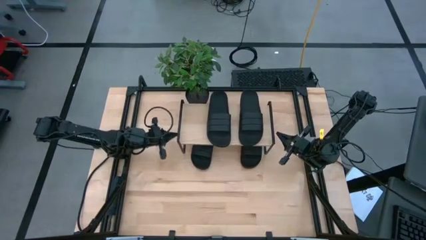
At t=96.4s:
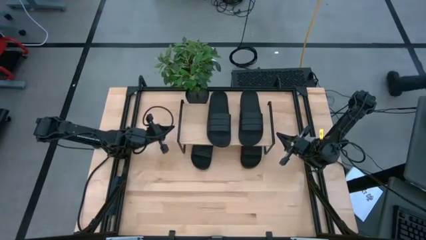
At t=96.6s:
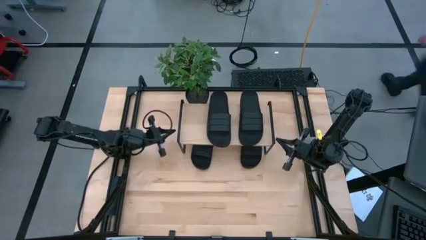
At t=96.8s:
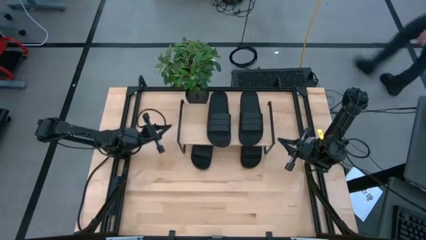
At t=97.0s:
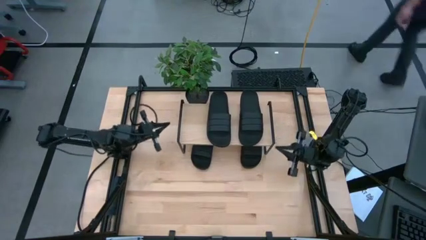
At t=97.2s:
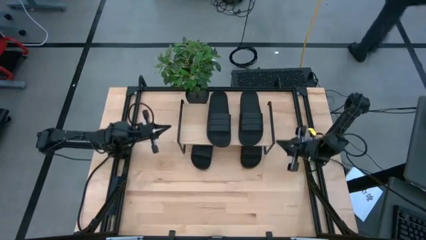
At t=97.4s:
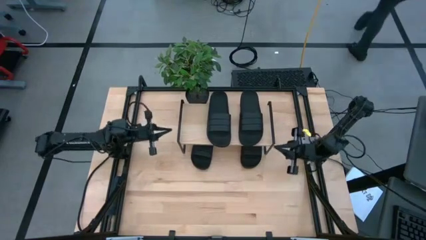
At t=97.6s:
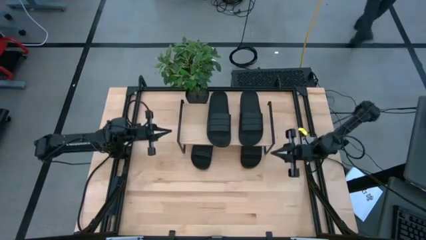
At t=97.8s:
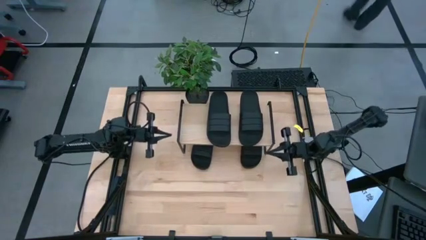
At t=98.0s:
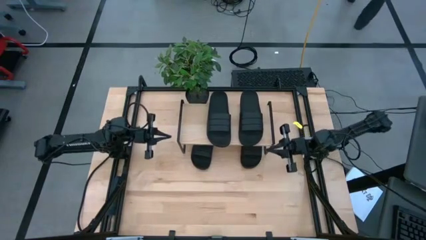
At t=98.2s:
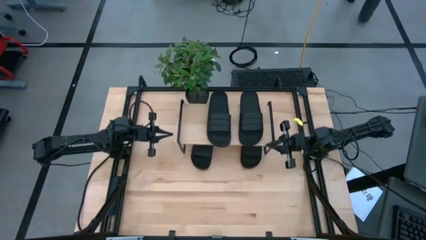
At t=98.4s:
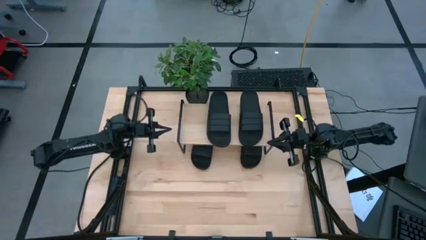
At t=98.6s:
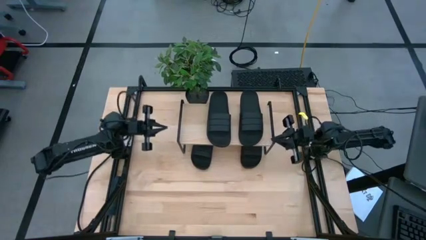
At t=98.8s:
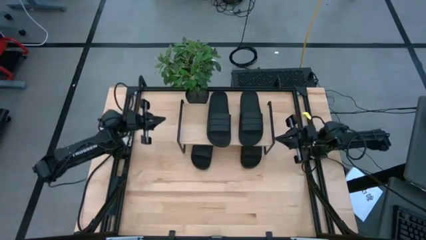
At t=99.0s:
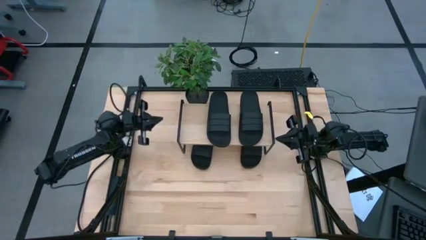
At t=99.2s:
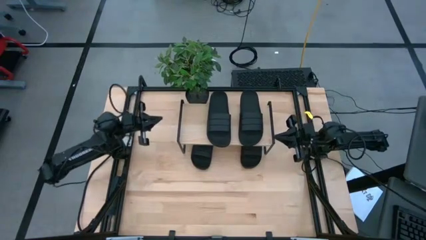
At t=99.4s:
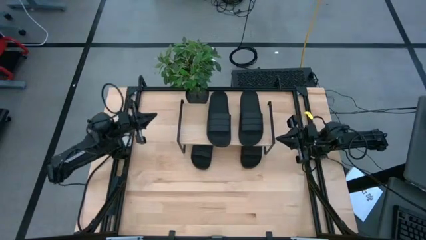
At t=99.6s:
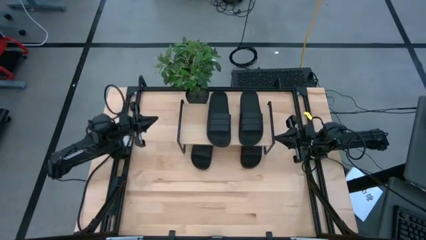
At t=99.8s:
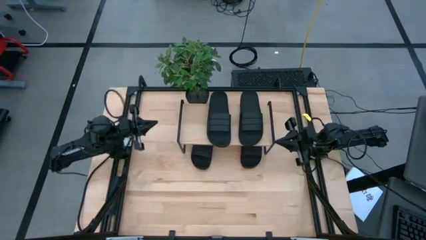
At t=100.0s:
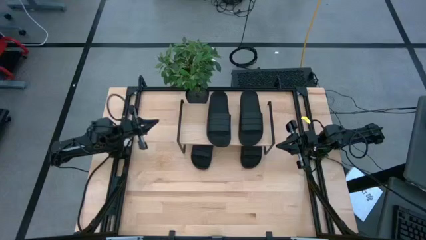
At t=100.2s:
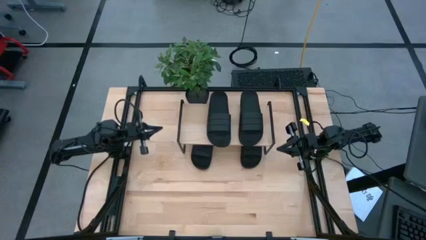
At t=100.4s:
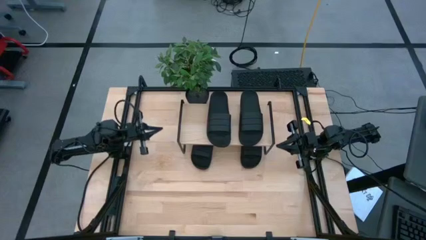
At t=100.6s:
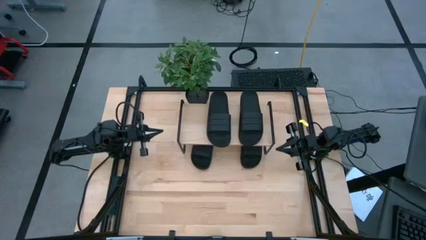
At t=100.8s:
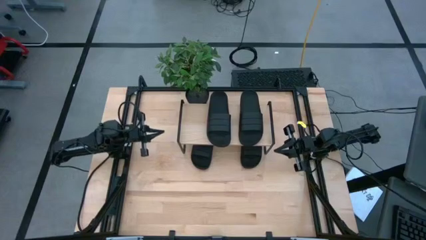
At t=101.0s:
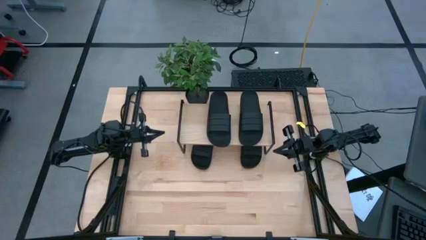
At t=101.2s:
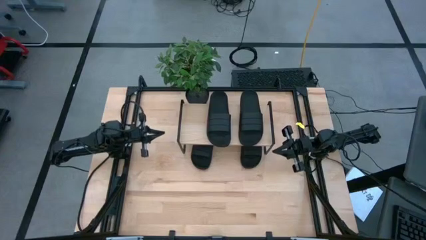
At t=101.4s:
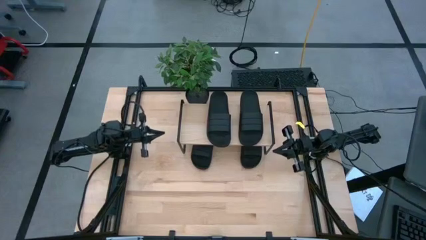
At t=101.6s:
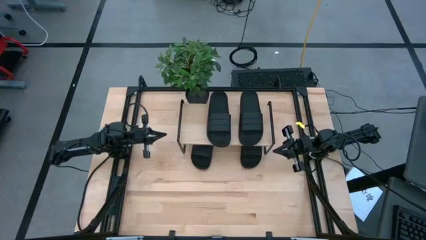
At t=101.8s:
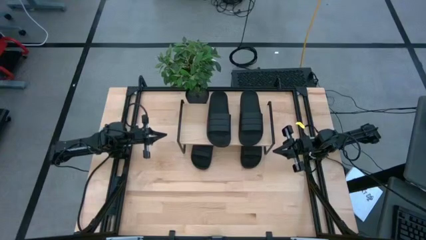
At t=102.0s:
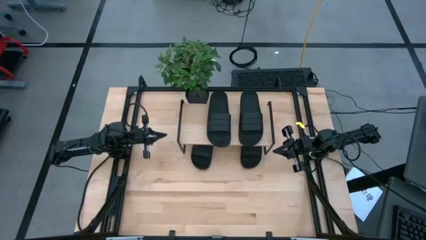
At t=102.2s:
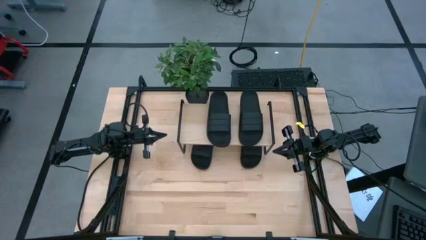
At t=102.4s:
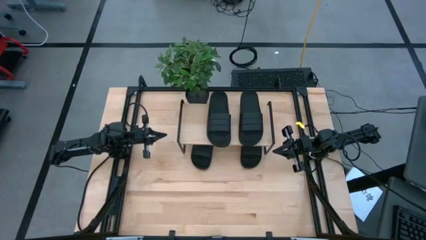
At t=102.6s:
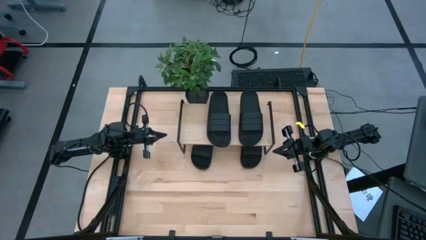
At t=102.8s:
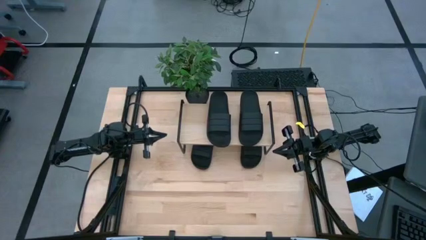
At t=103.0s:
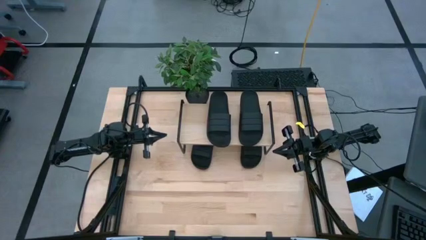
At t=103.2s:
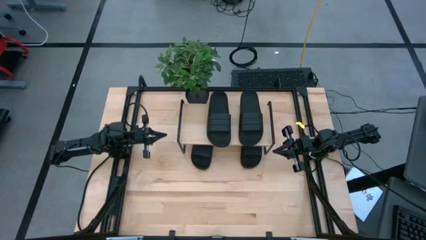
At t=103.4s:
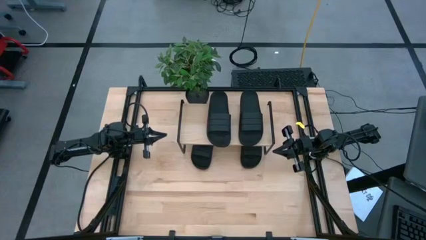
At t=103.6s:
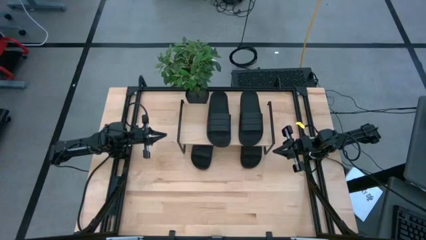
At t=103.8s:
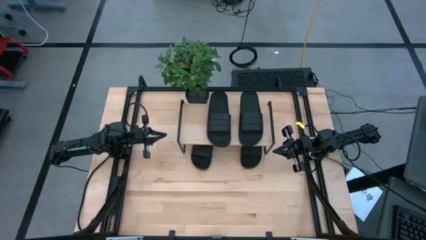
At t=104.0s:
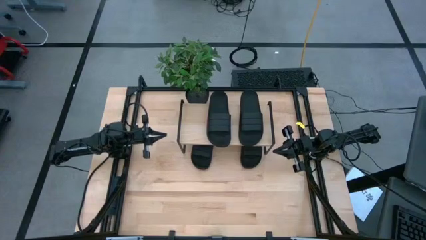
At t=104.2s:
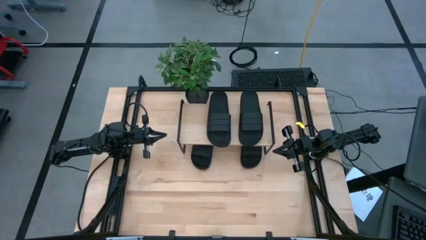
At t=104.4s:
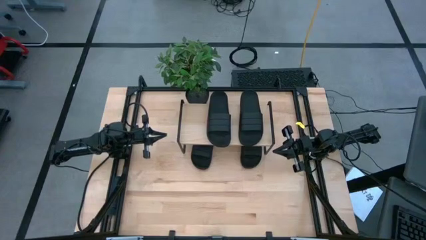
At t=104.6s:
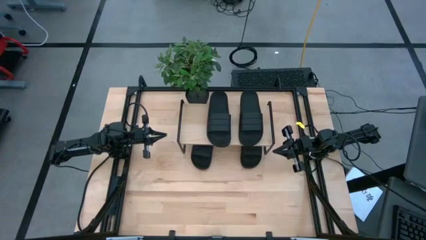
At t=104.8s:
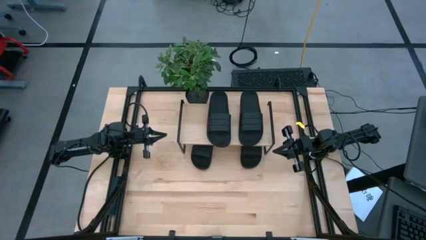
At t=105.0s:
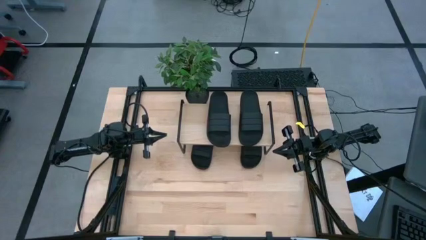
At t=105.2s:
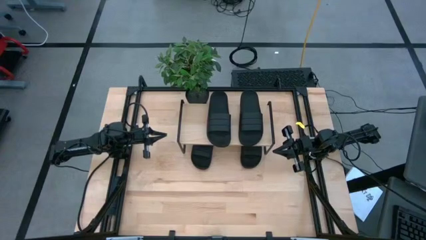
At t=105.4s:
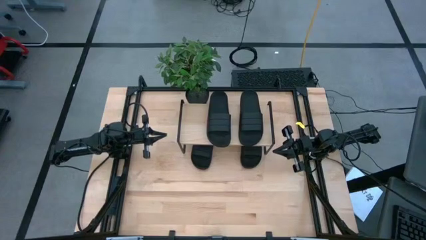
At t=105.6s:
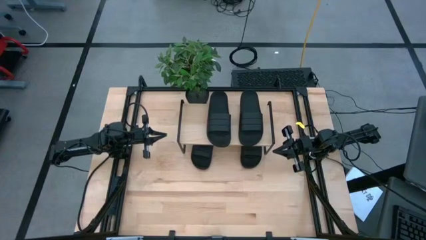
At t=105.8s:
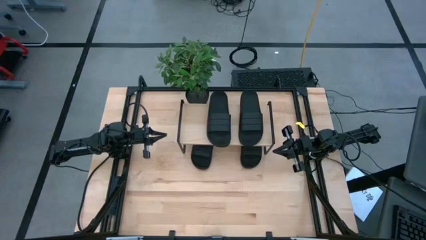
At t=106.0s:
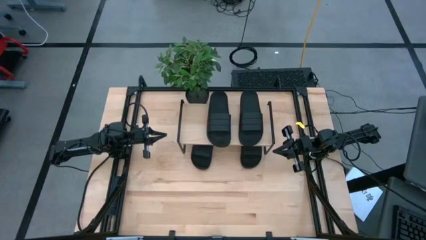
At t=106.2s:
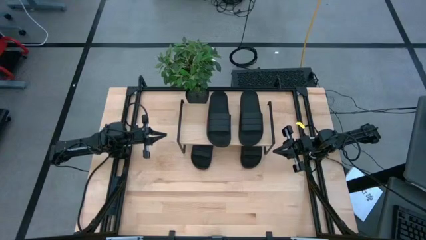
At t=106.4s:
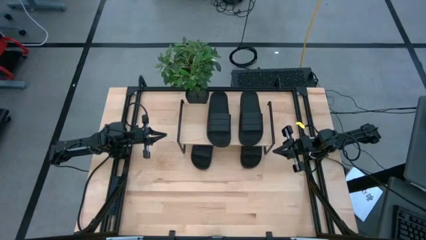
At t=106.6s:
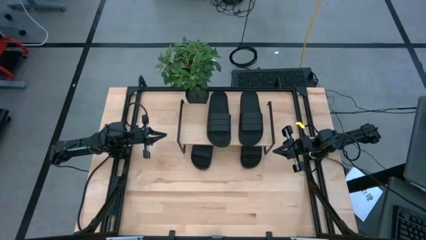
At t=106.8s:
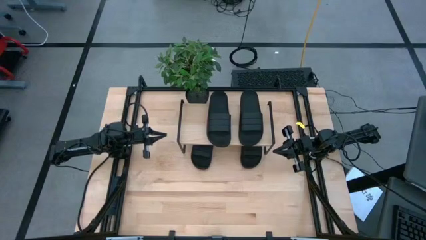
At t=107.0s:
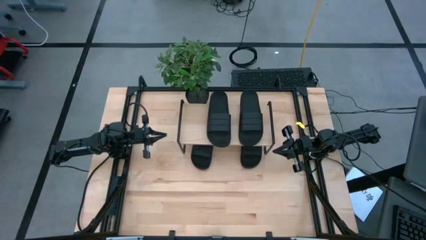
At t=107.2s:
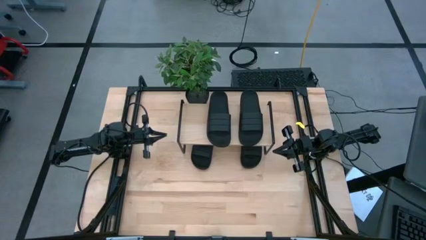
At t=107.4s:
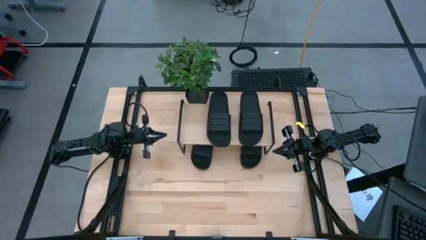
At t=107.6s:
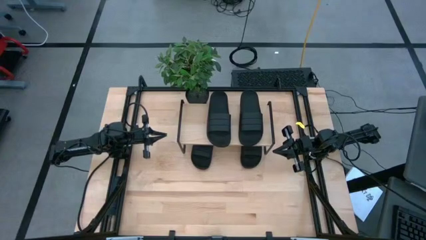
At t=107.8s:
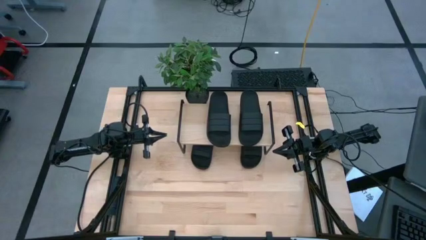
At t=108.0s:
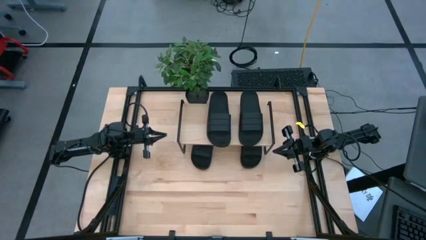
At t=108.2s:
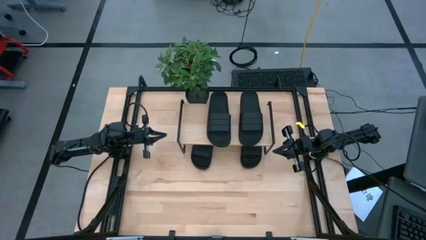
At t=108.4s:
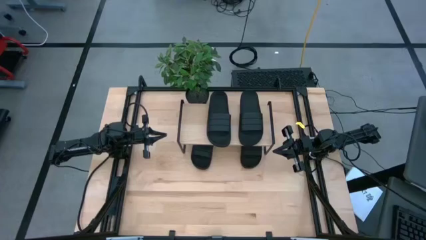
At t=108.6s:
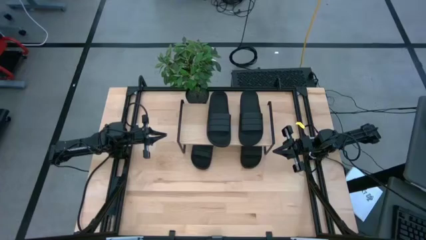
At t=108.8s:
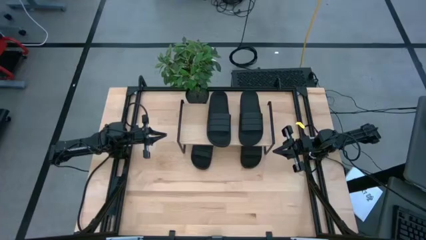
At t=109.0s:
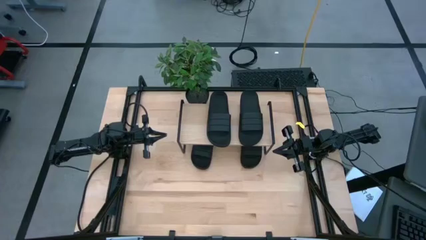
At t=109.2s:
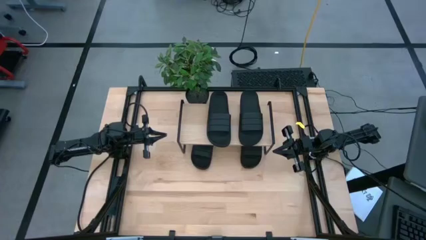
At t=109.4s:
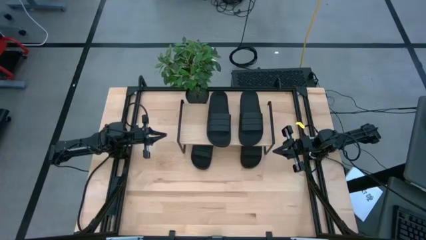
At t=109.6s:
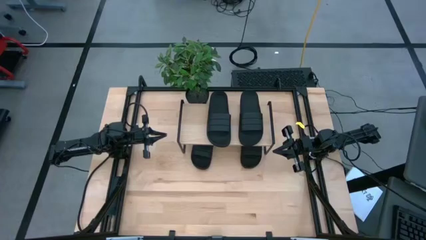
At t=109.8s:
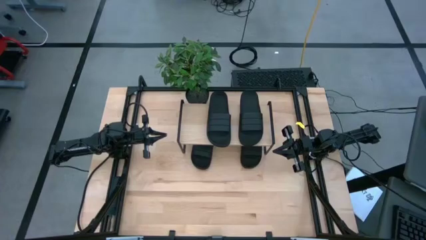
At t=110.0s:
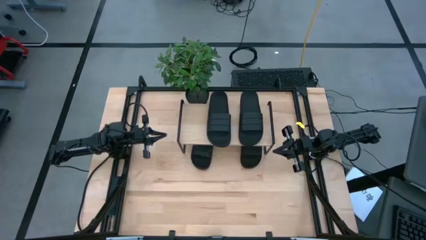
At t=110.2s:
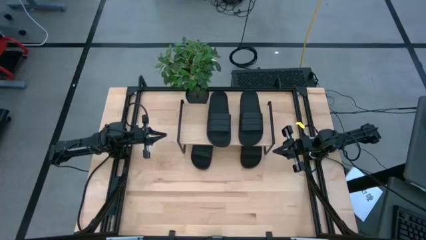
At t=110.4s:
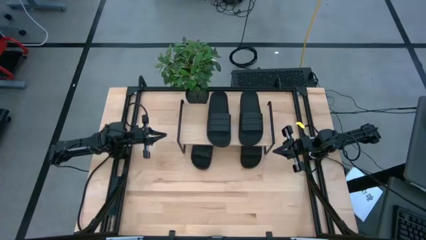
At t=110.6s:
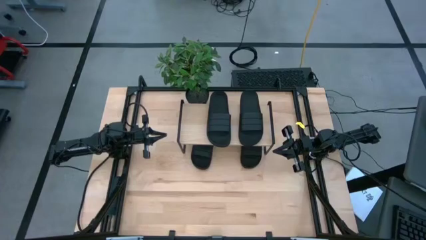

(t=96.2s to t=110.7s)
Task: Pick and place slides into the shelf
Return to Home Position

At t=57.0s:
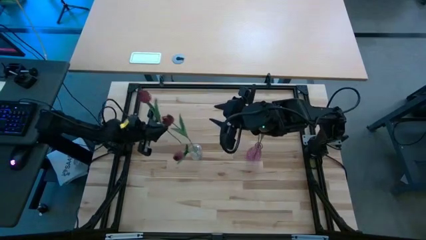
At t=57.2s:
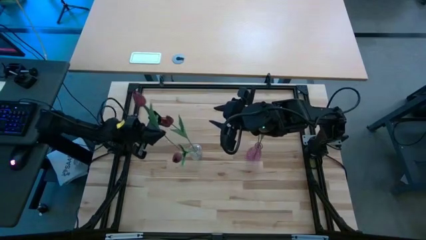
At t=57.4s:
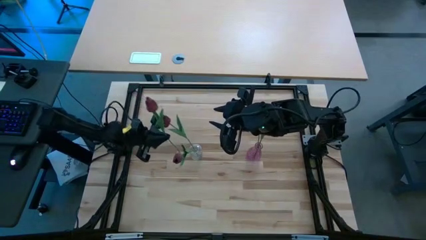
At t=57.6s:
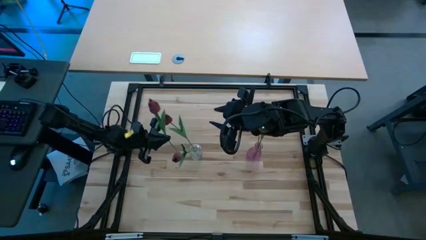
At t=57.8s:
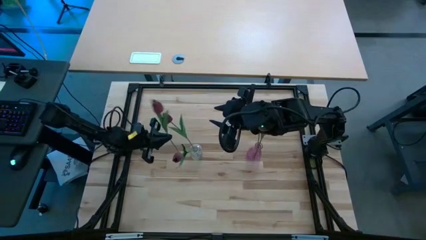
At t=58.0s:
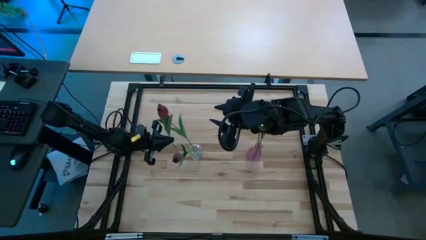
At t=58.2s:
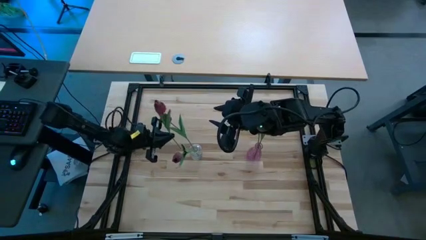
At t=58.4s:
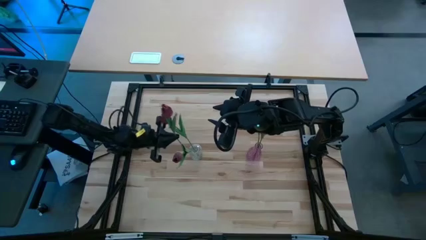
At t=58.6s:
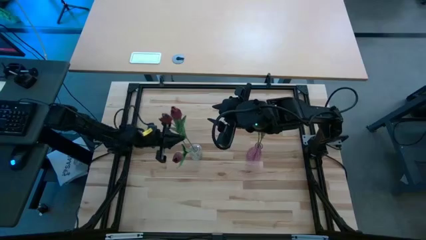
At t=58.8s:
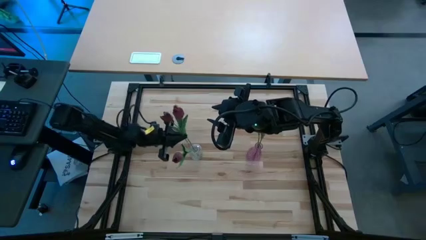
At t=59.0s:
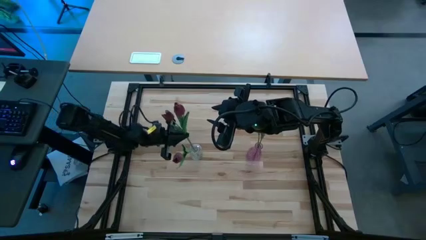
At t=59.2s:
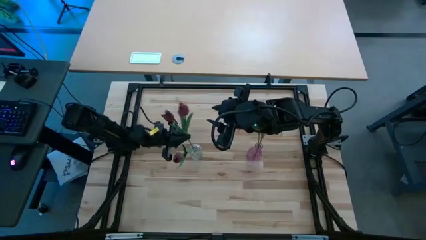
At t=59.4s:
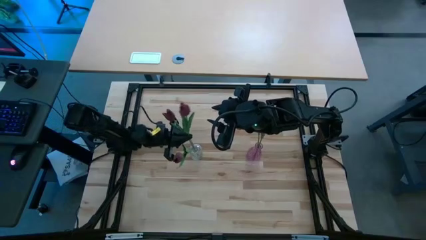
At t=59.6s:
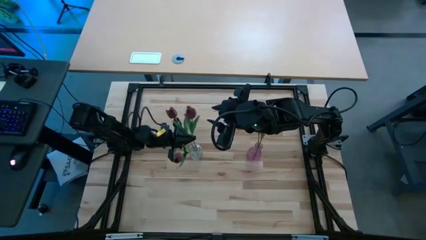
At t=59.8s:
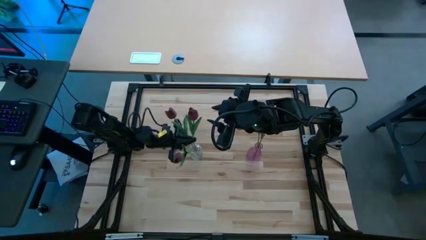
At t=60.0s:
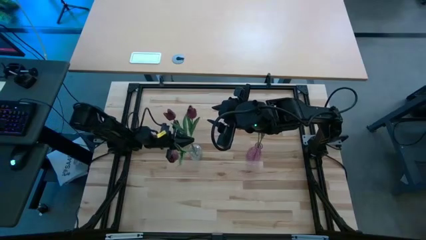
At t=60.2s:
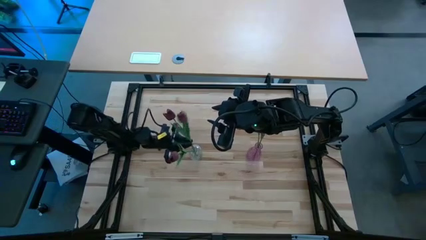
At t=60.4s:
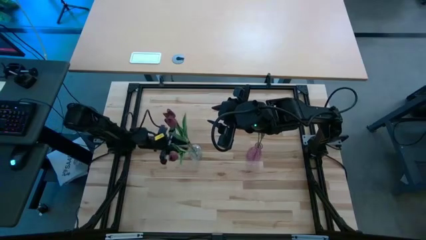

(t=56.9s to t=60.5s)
Task: Sort flowers into vase by color
Put the red flower into the transparent vase
